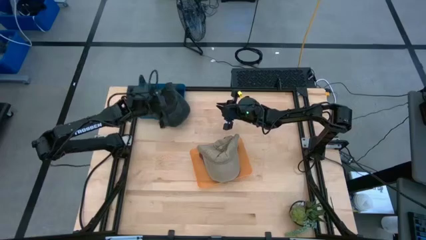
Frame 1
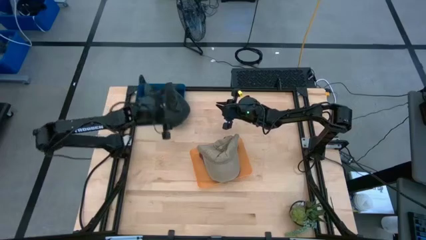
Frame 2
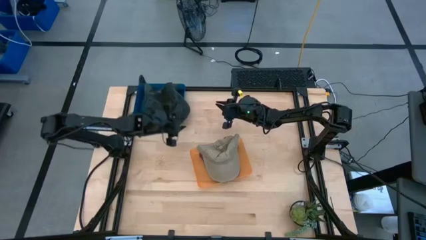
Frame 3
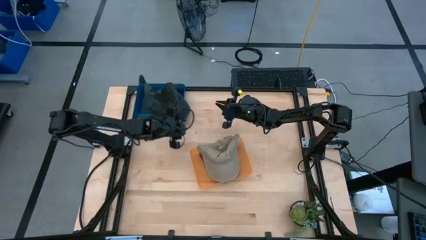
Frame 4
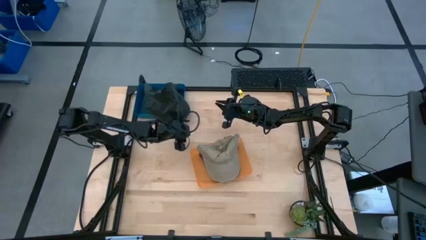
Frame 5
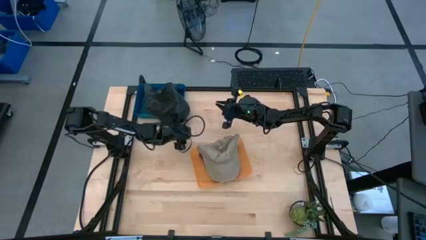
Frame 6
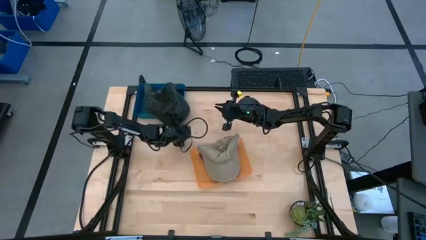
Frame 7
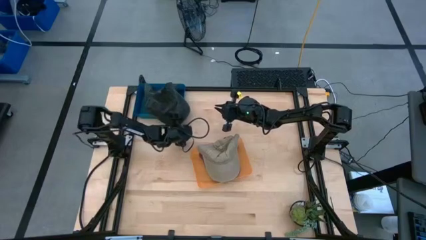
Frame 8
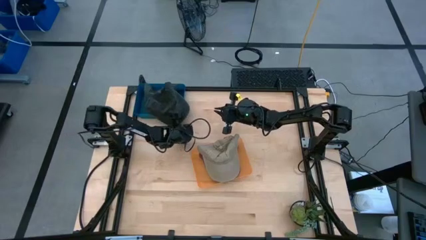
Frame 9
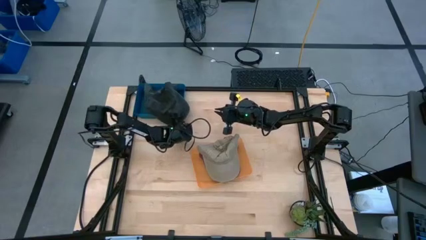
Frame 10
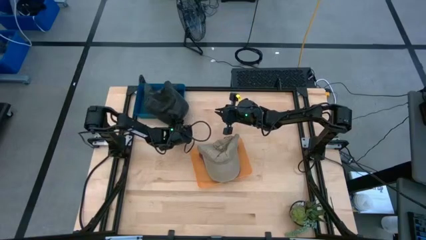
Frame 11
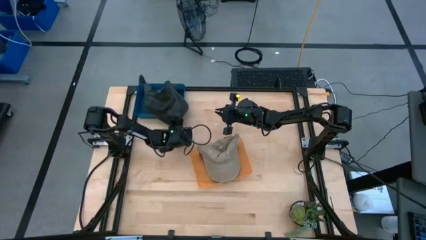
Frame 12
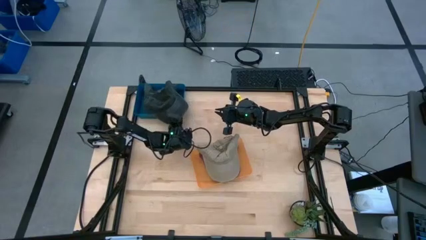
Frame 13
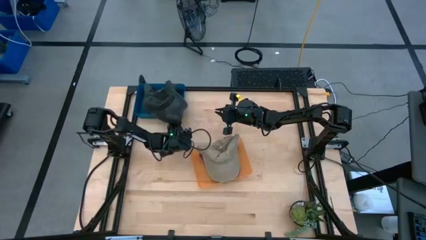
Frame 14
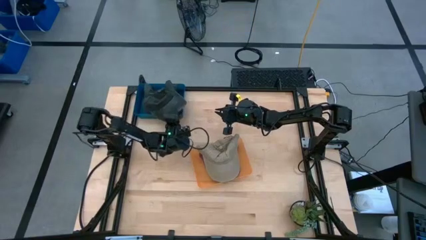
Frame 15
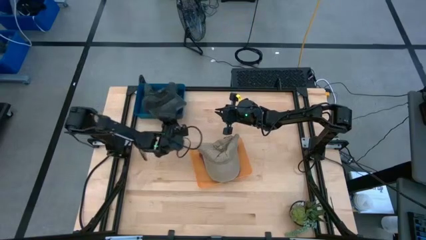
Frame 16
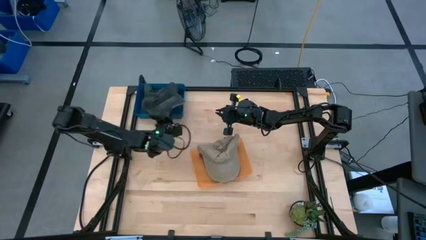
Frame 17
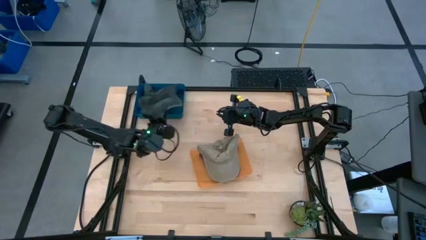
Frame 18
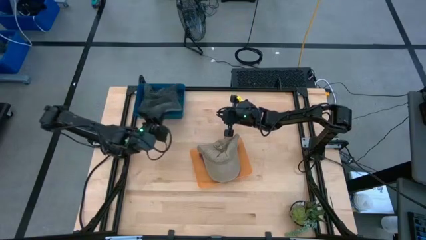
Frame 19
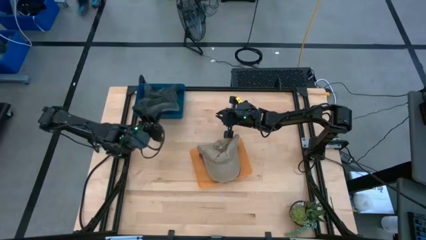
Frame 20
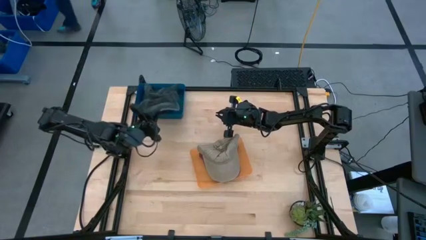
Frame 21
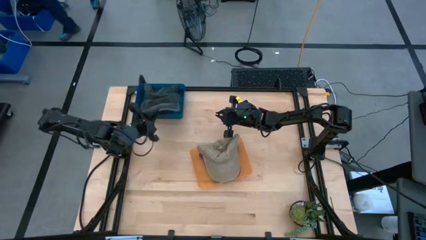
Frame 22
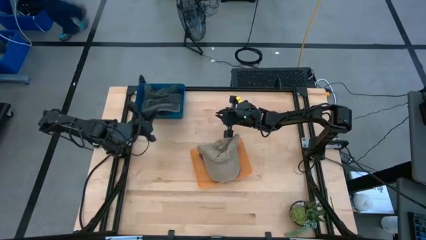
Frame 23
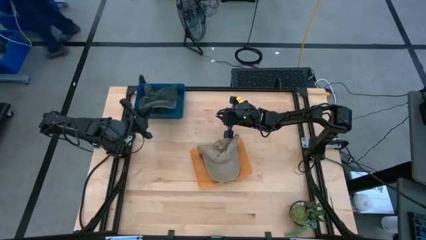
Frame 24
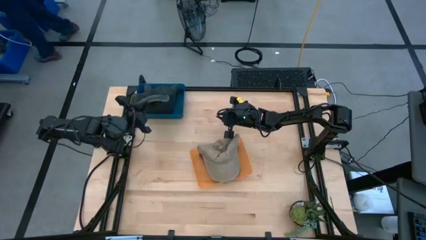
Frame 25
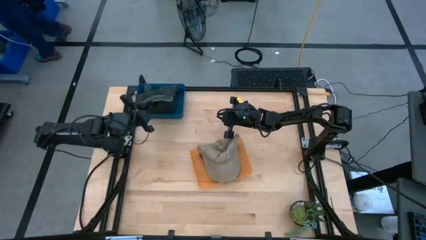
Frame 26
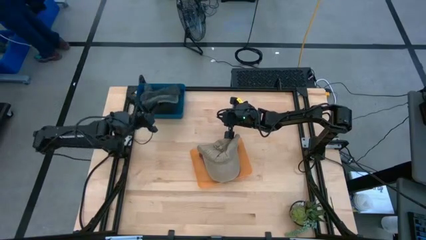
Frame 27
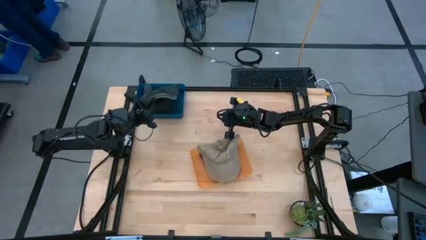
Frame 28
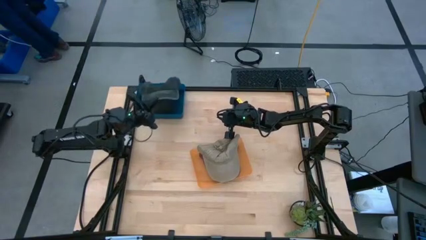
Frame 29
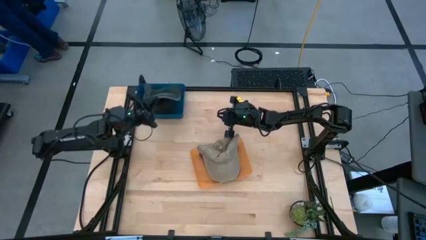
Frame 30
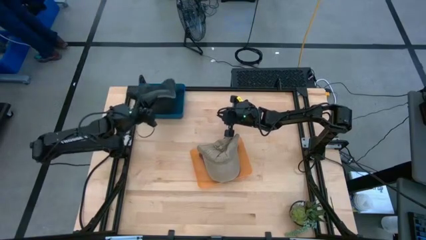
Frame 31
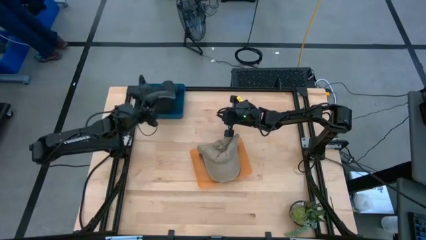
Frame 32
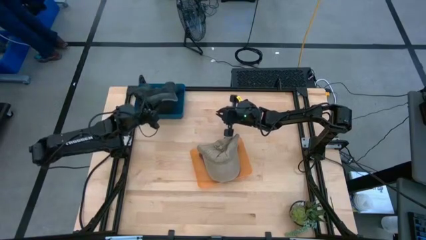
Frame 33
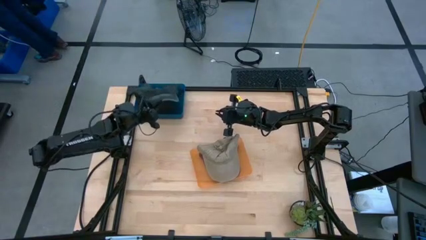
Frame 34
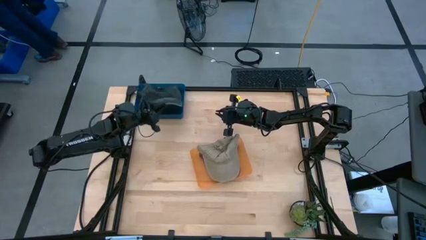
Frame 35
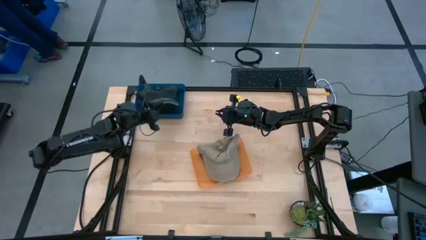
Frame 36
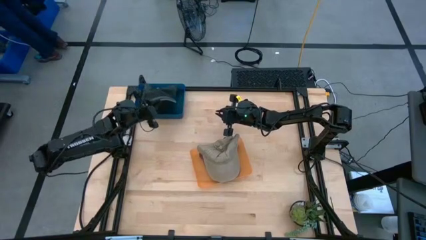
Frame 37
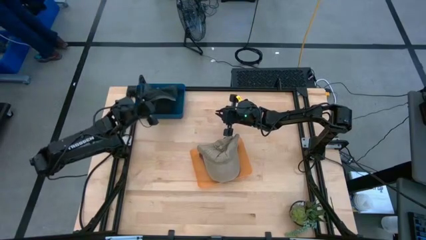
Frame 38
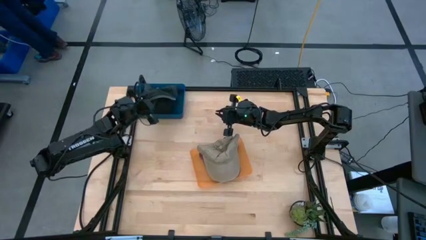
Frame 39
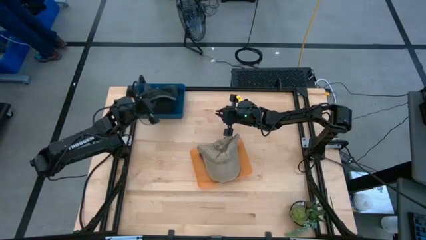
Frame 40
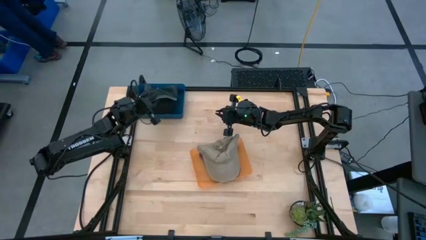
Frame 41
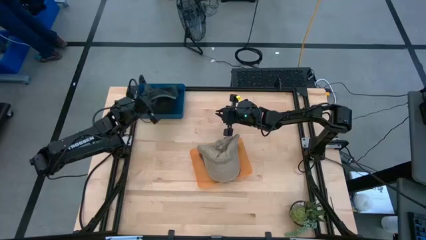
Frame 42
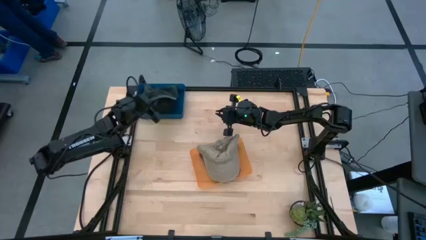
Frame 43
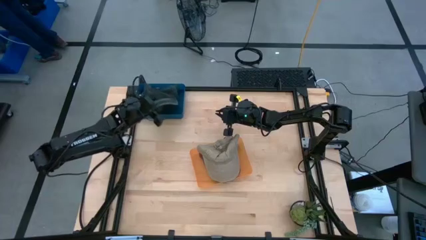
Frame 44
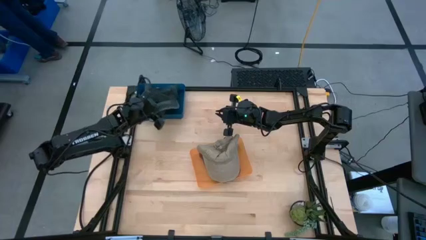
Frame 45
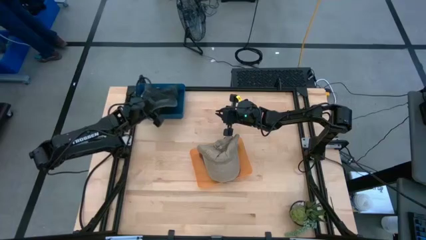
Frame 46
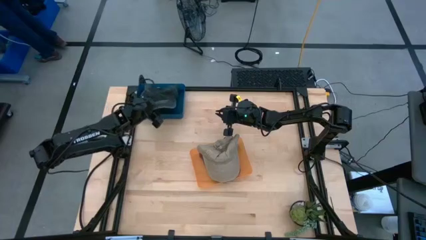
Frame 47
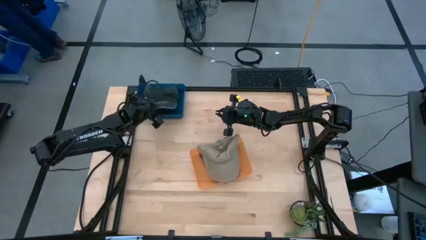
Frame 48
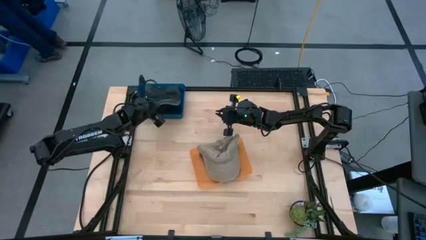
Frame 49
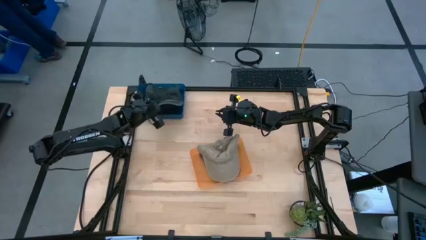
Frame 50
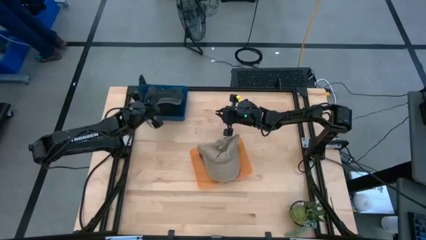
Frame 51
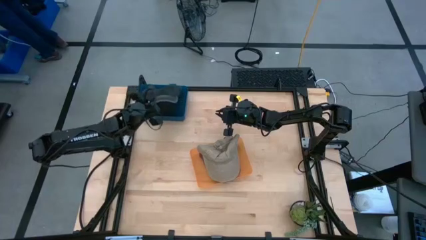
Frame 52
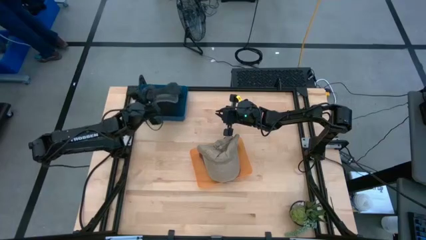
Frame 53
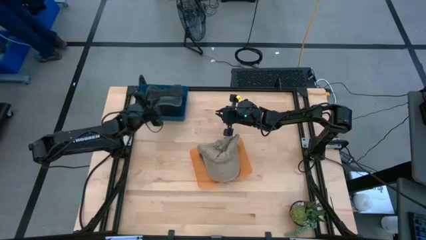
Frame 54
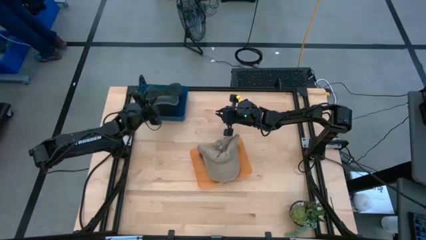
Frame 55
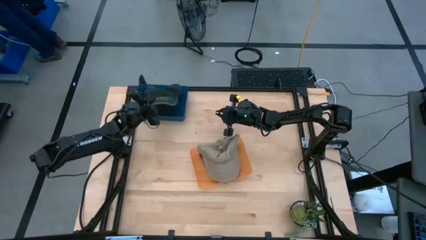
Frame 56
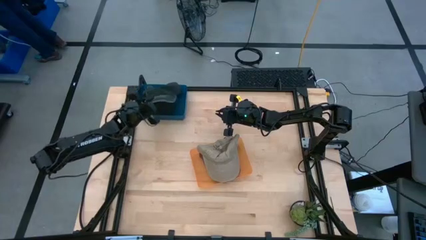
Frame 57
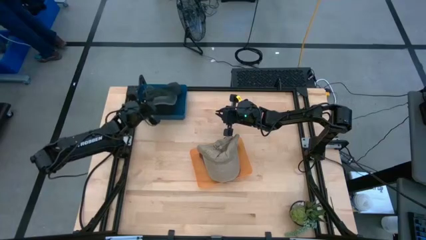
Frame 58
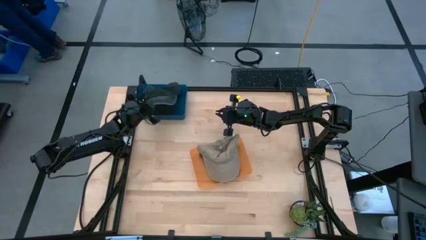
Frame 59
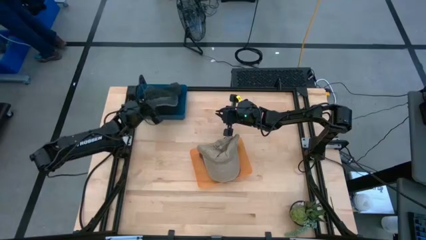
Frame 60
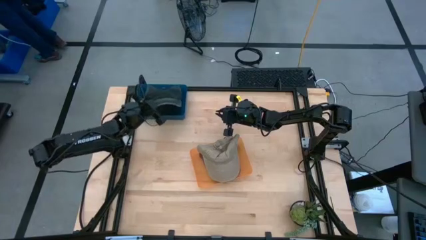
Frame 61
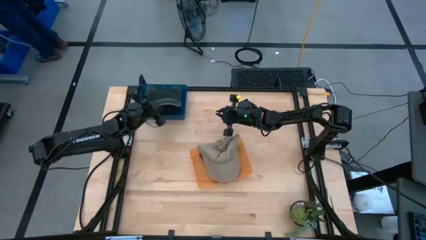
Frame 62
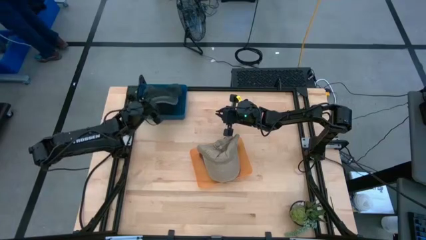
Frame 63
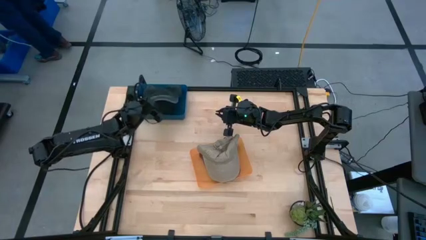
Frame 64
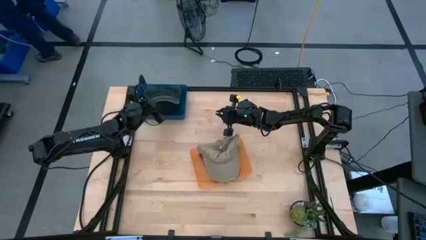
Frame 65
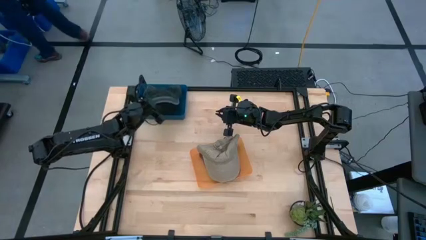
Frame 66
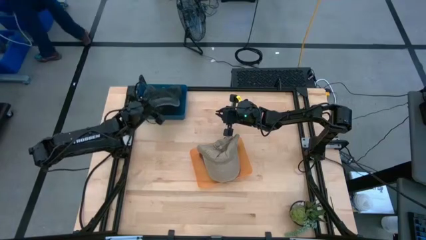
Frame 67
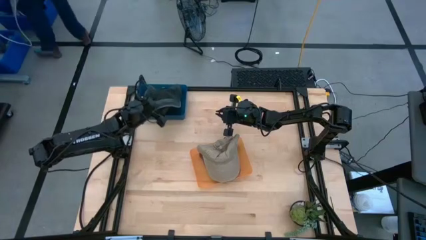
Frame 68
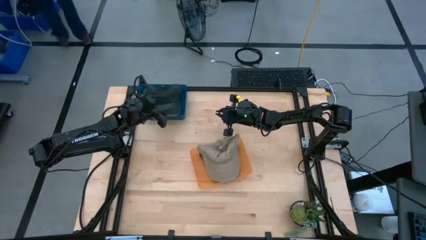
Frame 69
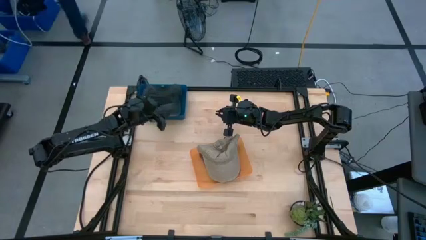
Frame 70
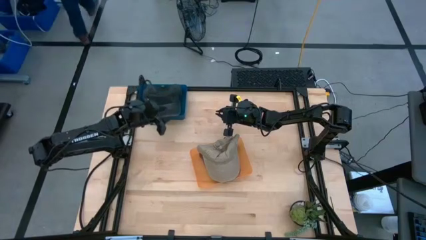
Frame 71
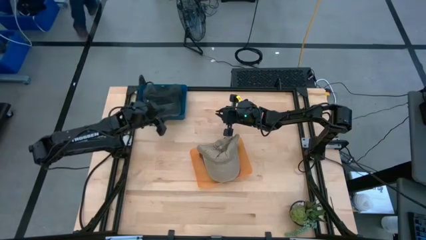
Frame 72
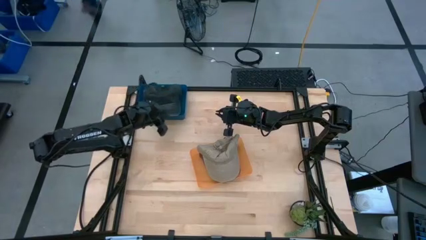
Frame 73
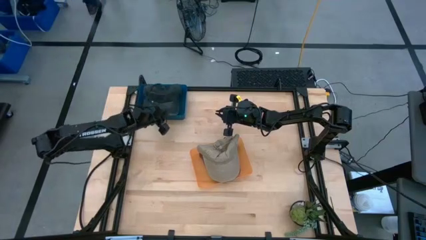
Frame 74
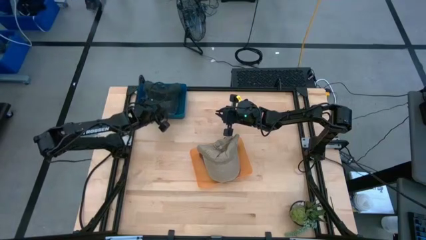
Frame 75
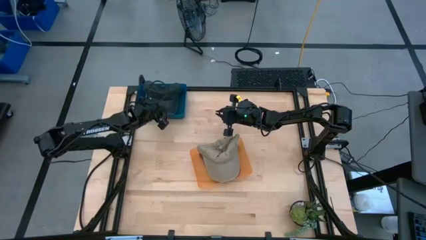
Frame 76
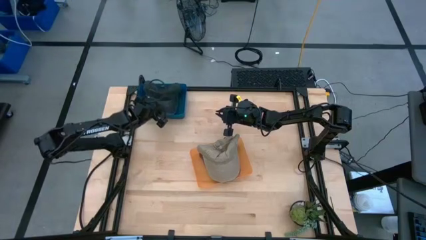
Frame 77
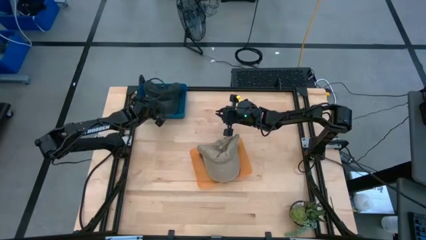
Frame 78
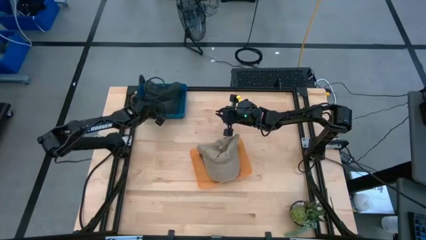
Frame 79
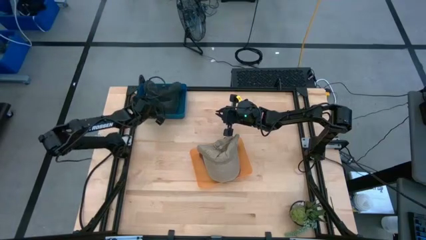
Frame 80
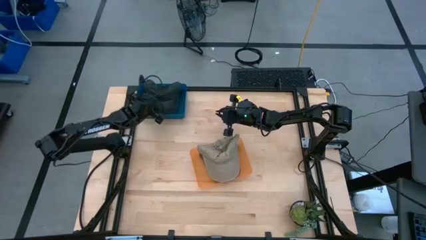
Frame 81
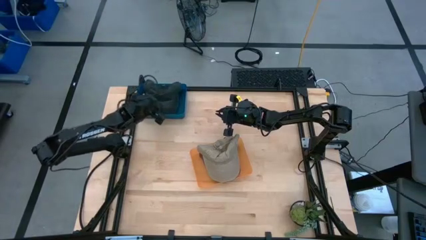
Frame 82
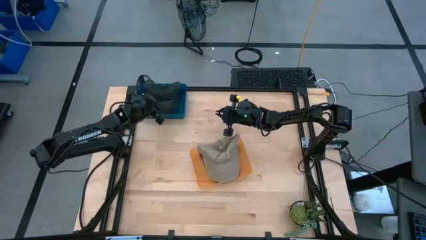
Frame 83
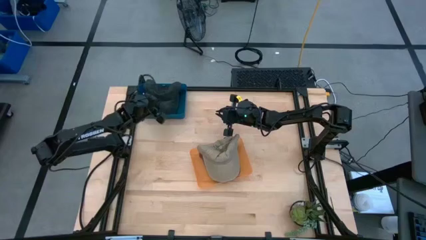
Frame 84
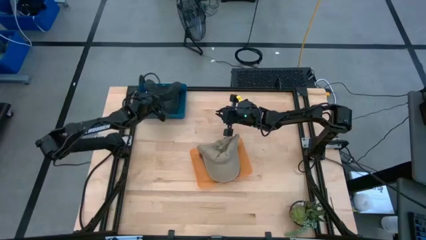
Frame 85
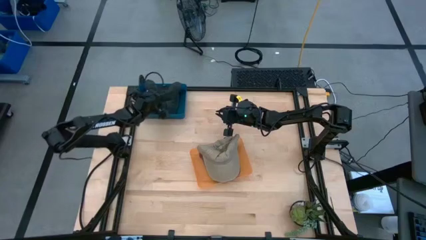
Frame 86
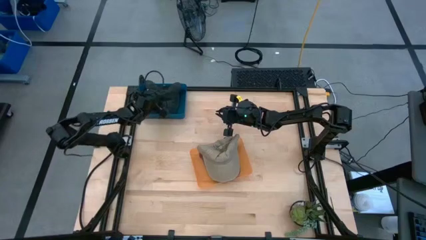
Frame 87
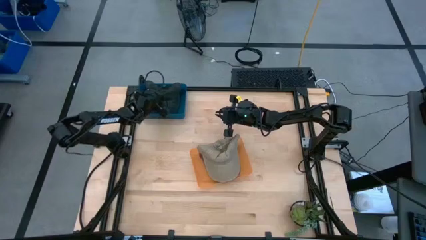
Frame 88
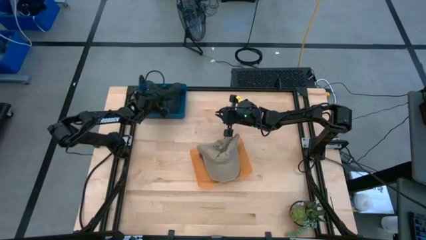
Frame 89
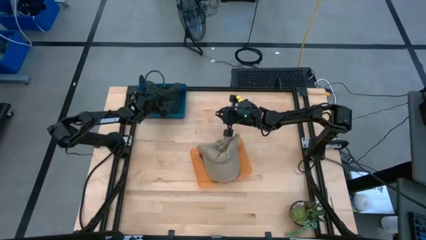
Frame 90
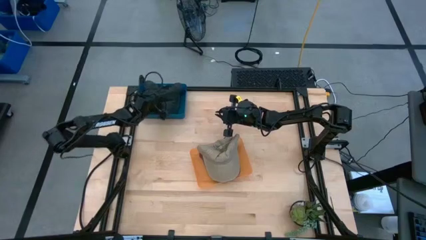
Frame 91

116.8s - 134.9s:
Task: Pick & Place hat
Put the black cap into the blue bin
